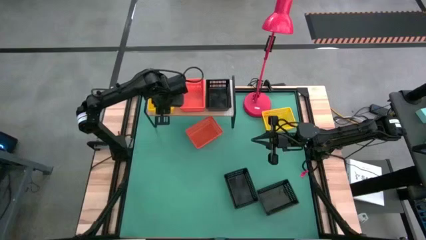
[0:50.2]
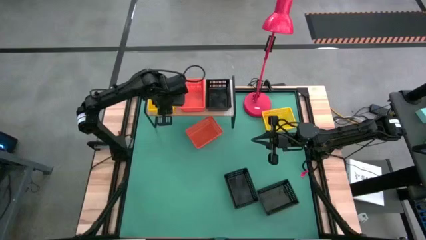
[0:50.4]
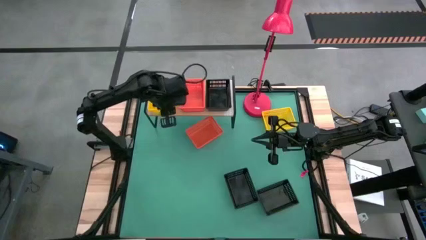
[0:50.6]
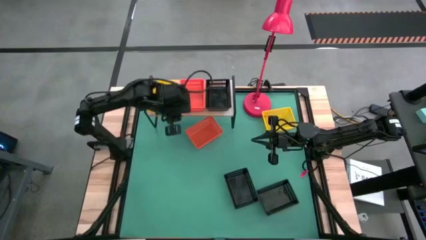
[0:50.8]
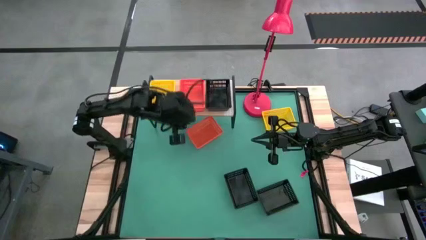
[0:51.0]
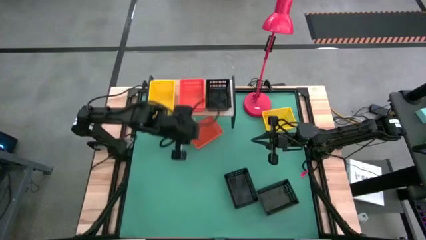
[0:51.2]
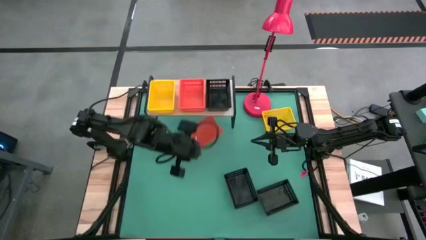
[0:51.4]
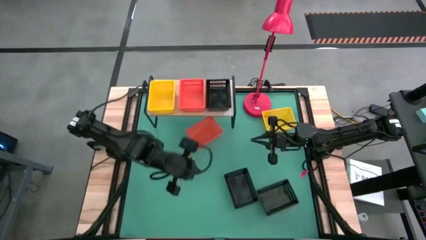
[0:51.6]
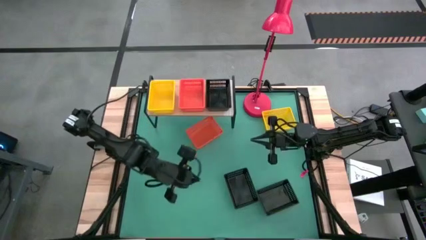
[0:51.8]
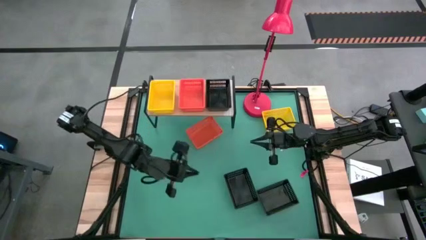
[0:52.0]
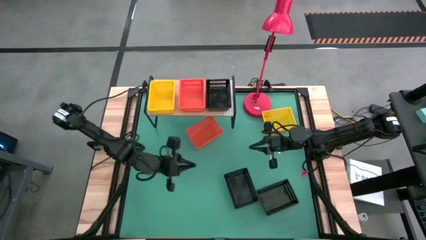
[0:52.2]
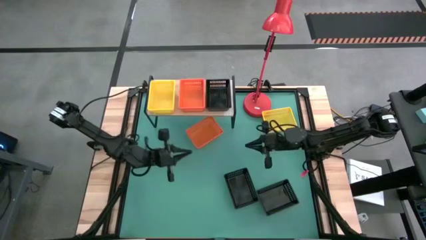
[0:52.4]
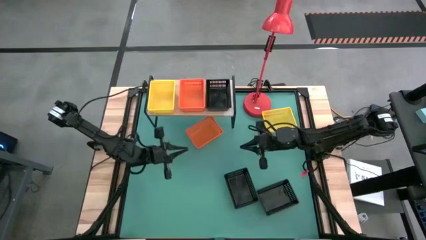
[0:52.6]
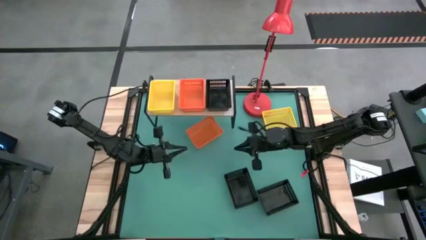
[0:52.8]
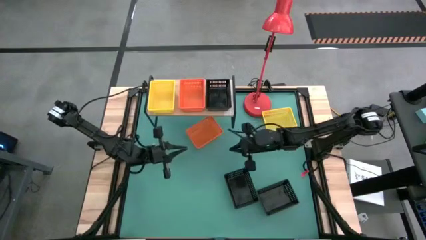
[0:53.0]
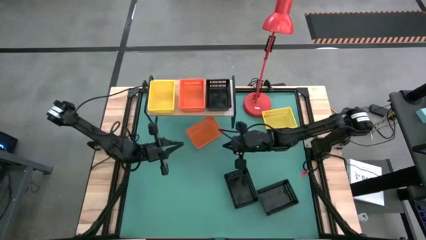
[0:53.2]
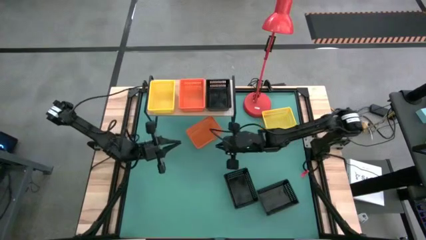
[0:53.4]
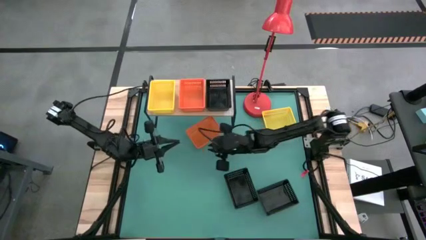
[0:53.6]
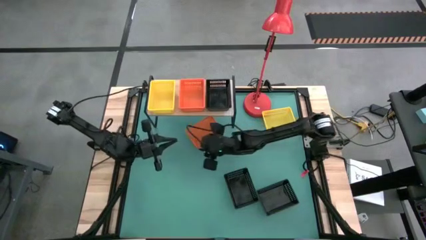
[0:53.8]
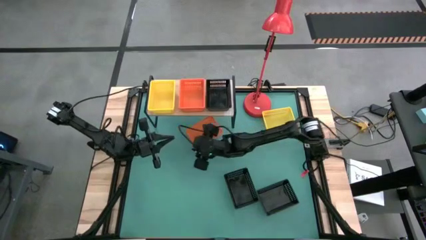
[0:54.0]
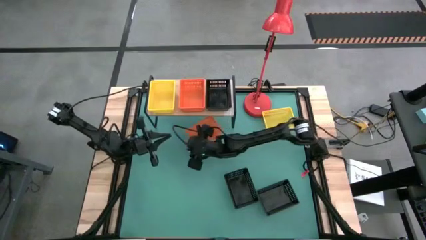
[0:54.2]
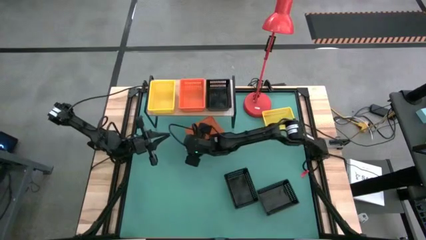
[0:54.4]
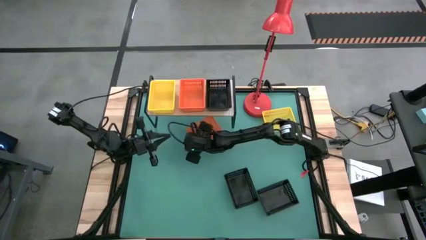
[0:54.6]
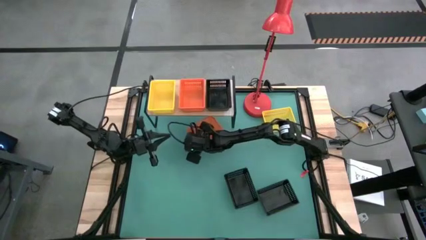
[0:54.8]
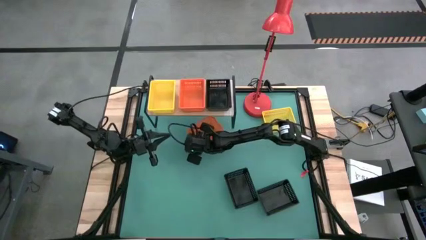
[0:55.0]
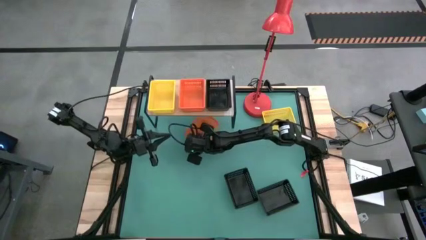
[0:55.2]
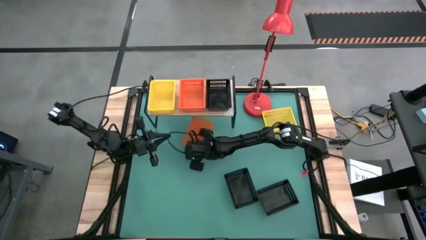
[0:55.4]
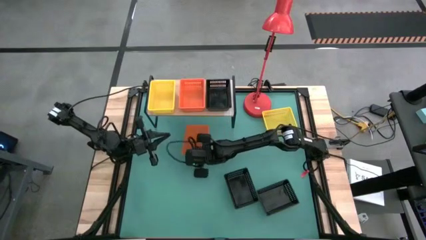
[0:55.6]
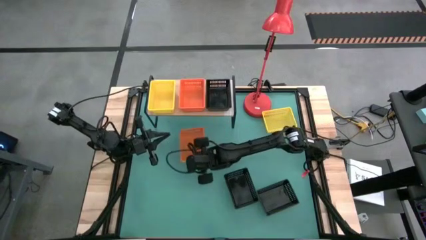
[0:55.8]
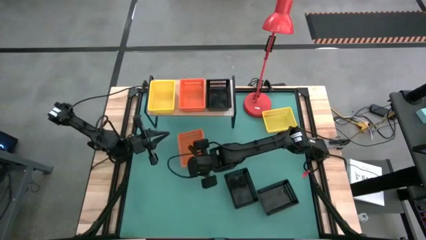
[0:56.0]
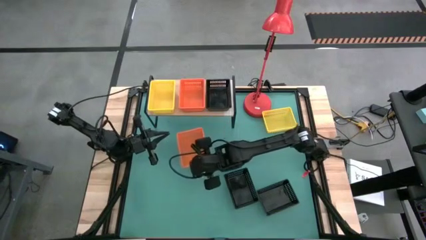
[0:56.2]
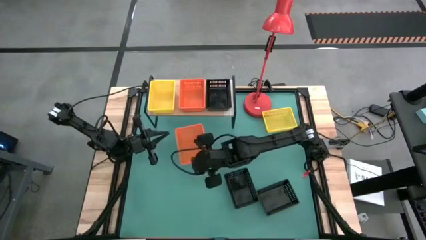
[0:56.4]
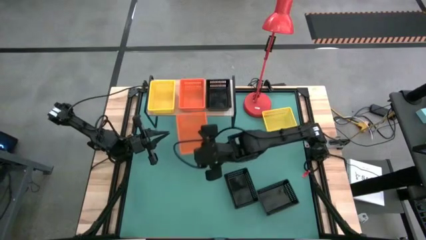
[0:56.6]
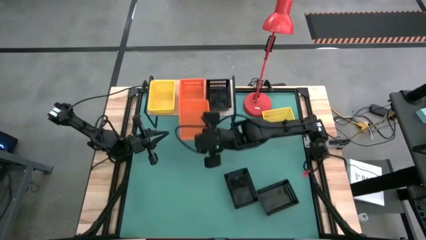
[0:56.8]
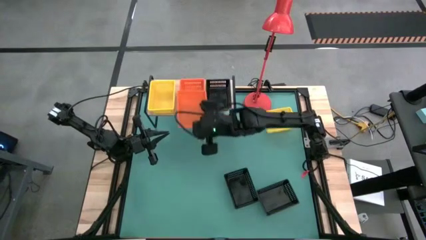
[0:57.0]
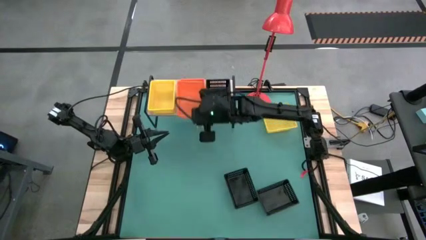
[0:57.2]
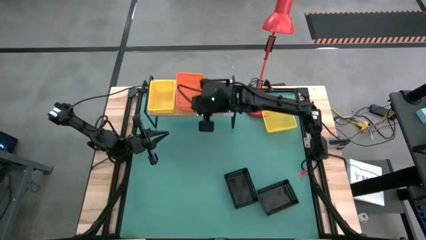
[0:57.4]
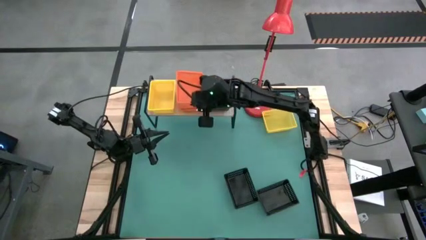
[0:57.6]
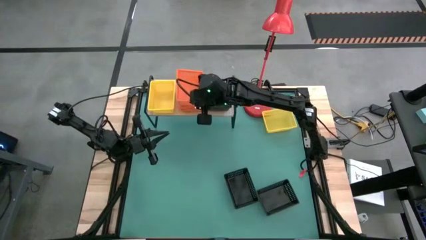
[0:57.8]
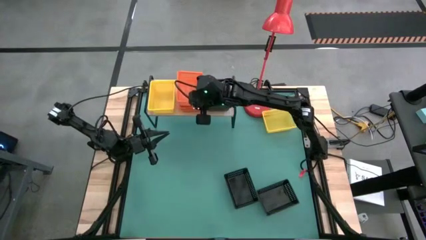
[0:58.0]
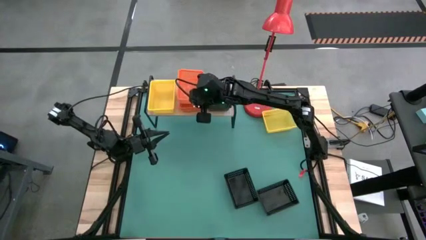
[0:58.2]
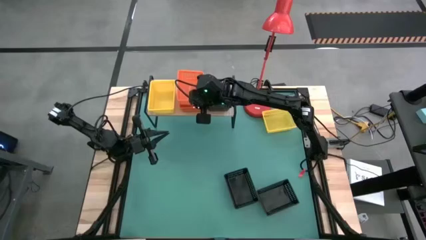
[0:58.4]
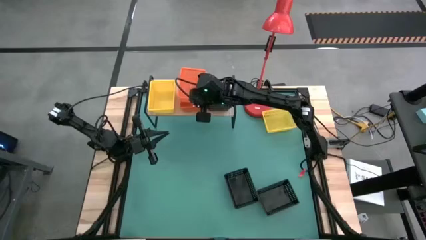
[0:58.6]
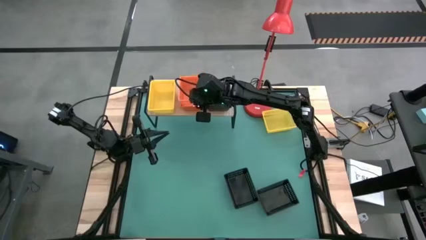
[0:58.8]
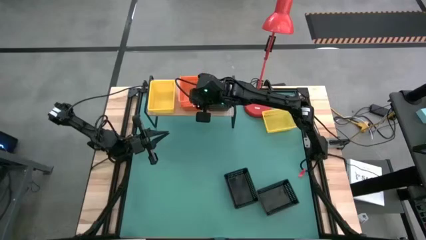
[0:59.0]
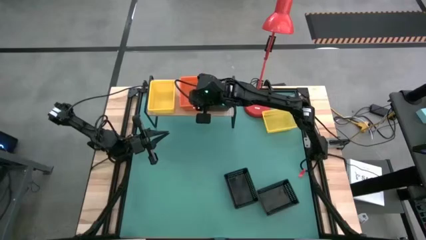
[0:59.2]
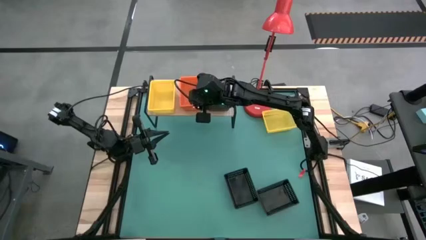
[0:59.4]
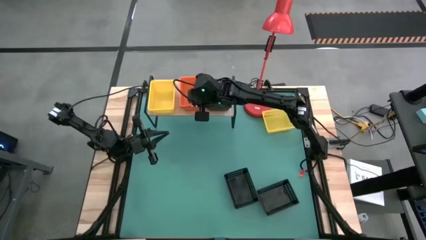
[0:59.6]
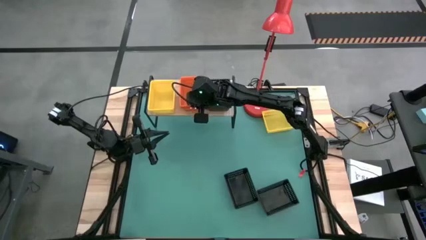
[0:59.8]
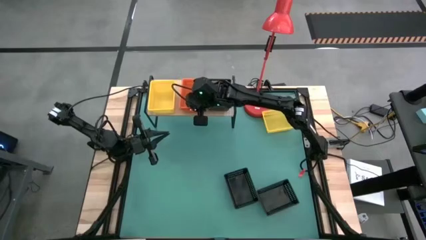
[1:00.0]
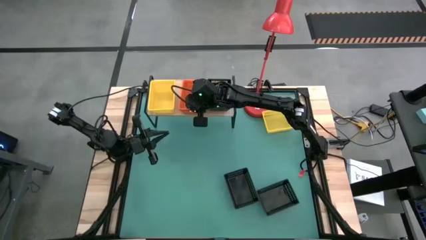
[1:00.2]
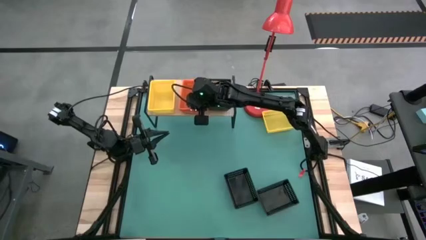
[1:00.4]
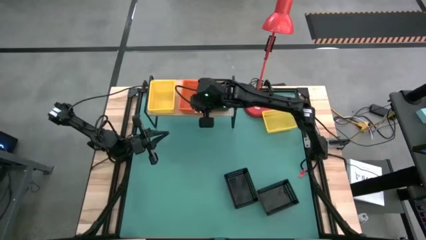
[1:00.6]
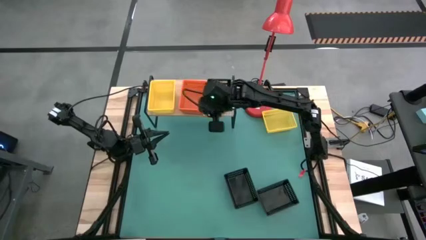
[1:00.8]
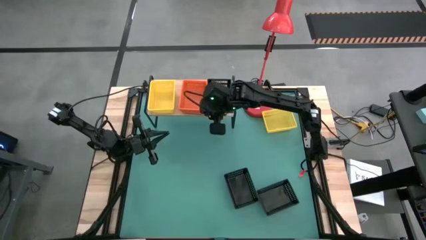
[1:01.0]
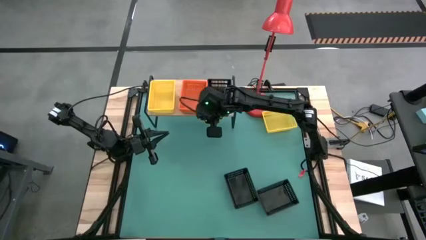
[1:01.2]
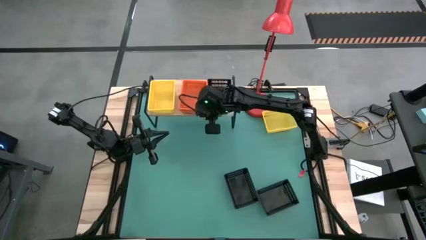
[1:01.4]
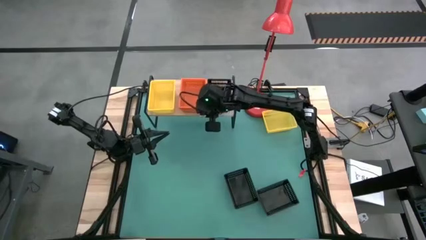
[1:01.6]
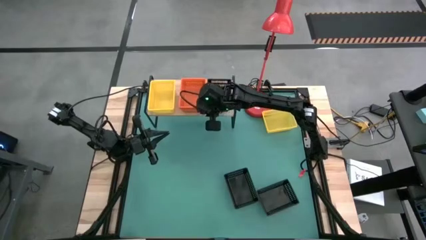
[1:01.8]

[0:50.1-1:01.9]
Task: Stack baskets on shelf by color
Stack the orange bin on top of the stacked orange bins on the shelf
